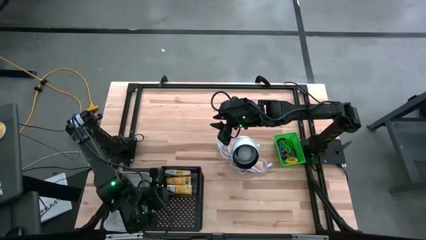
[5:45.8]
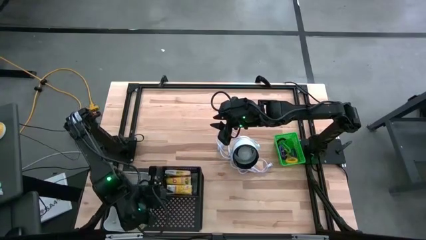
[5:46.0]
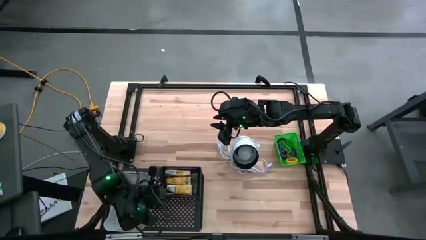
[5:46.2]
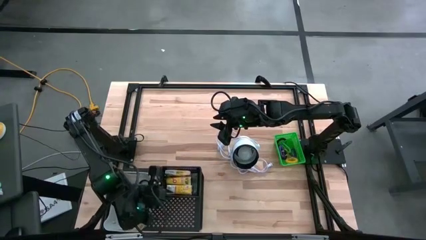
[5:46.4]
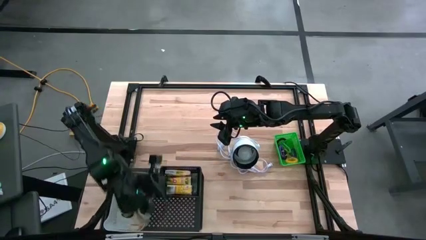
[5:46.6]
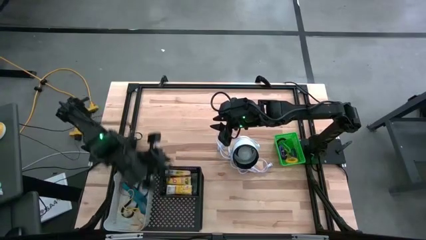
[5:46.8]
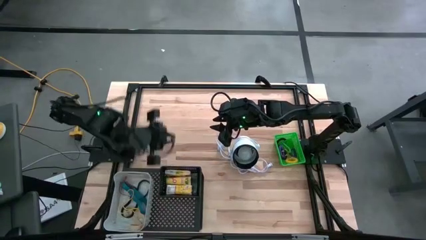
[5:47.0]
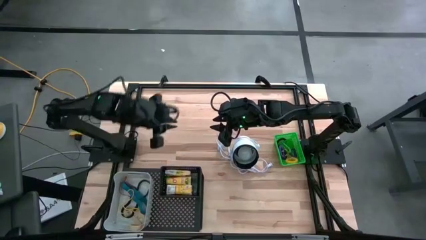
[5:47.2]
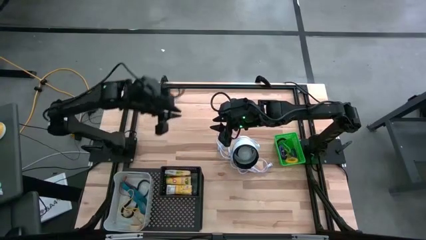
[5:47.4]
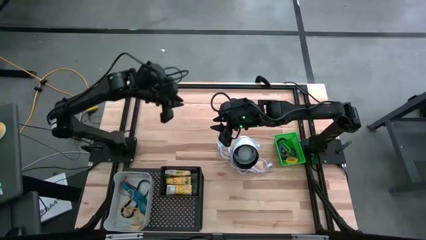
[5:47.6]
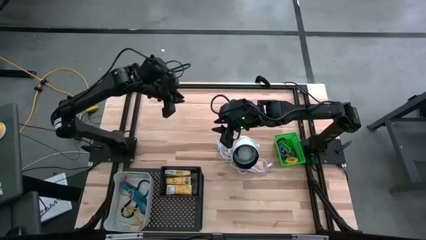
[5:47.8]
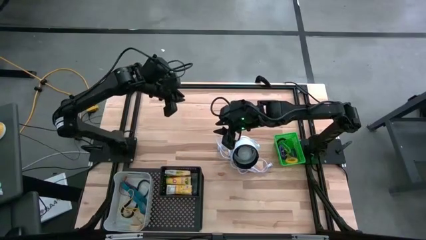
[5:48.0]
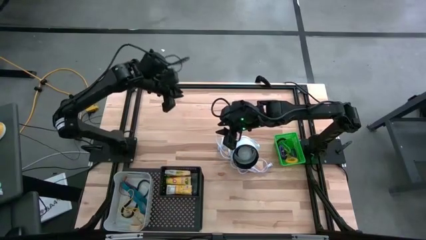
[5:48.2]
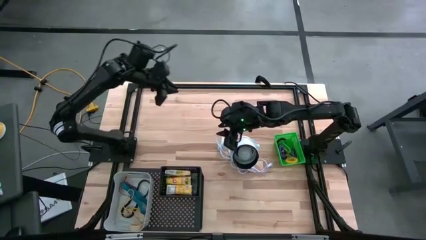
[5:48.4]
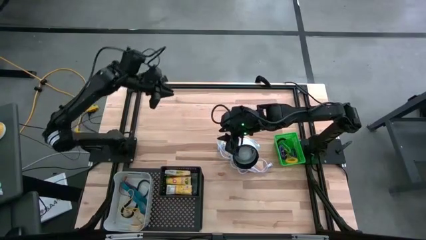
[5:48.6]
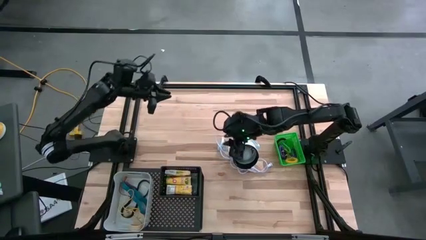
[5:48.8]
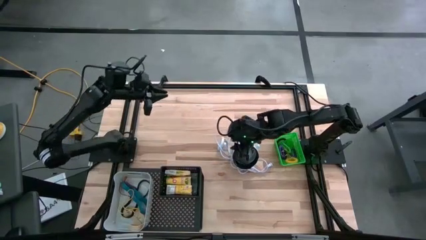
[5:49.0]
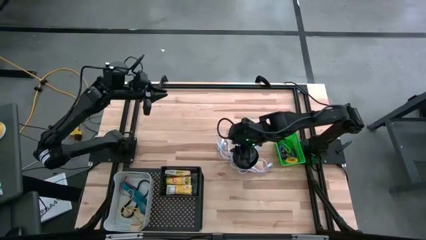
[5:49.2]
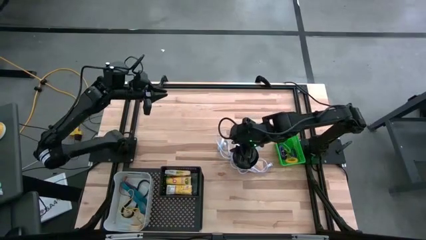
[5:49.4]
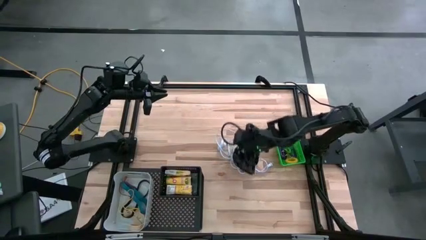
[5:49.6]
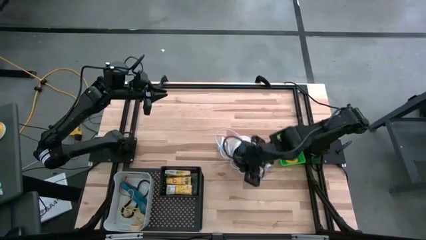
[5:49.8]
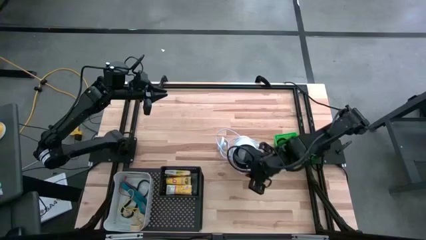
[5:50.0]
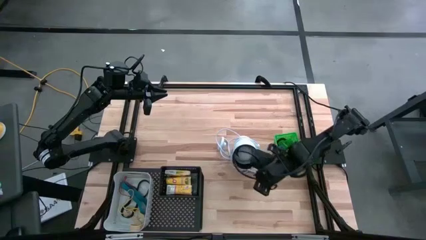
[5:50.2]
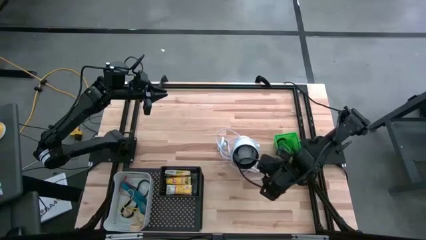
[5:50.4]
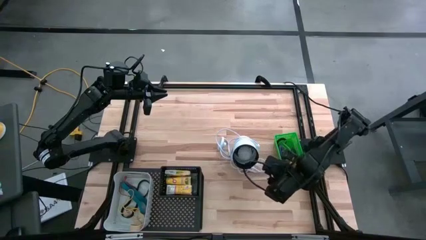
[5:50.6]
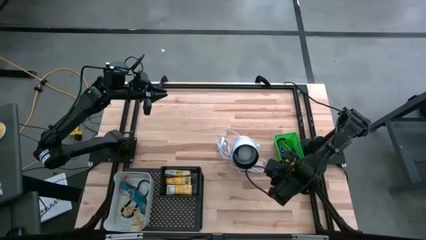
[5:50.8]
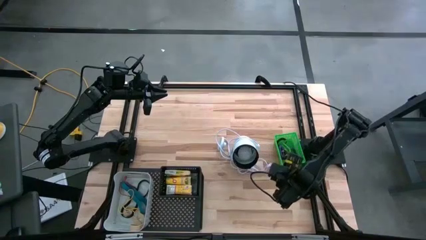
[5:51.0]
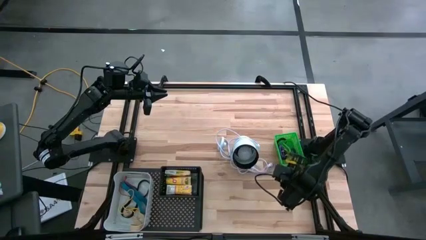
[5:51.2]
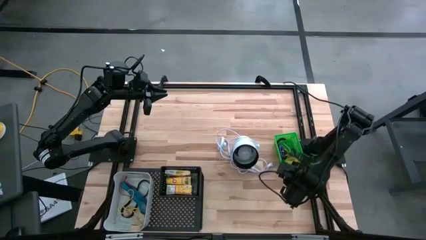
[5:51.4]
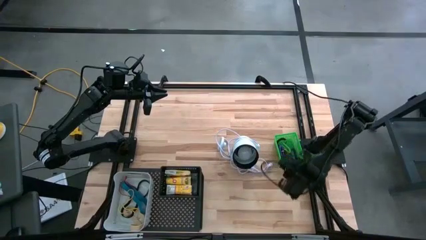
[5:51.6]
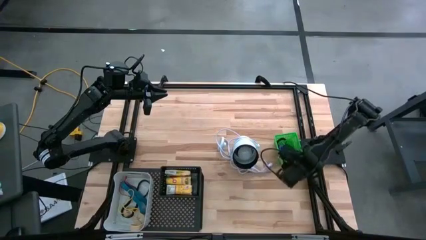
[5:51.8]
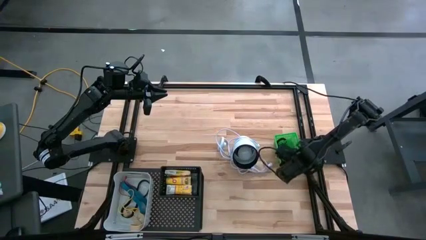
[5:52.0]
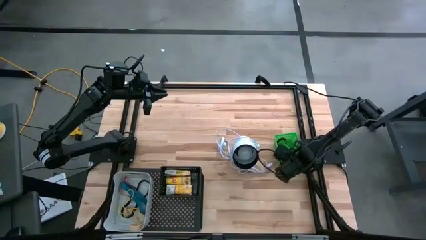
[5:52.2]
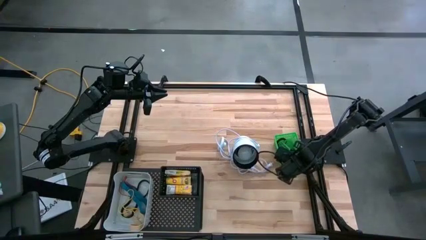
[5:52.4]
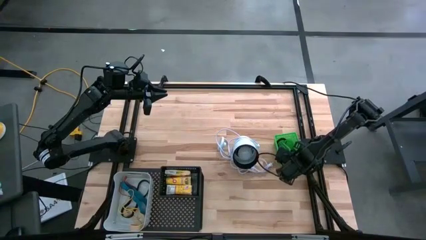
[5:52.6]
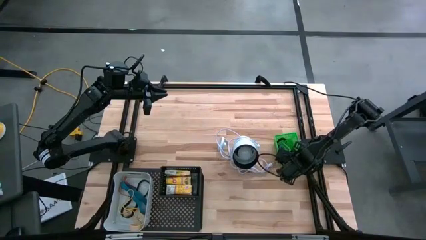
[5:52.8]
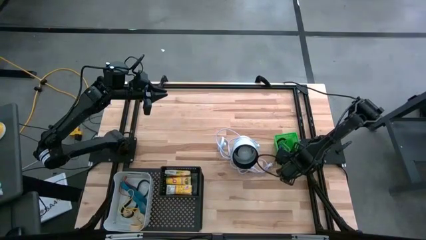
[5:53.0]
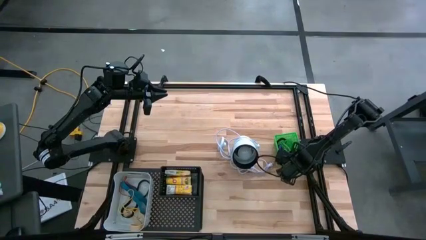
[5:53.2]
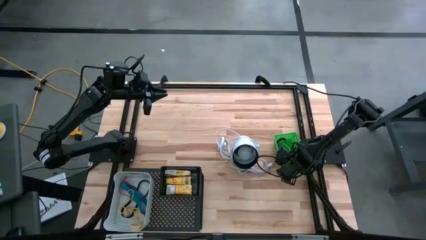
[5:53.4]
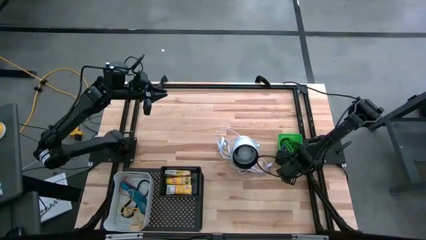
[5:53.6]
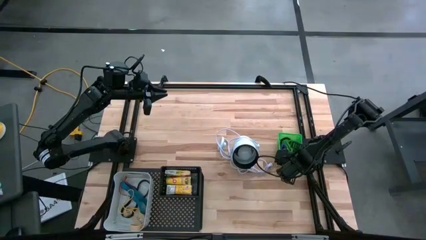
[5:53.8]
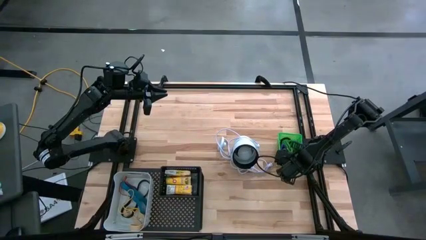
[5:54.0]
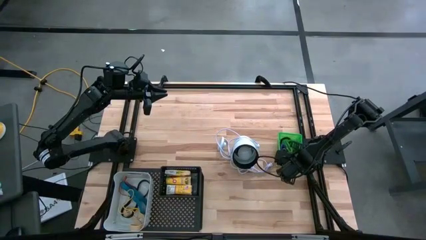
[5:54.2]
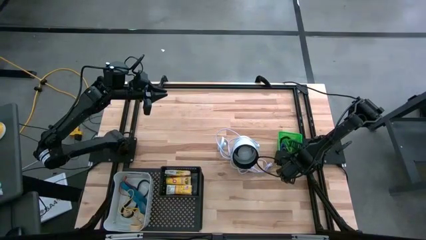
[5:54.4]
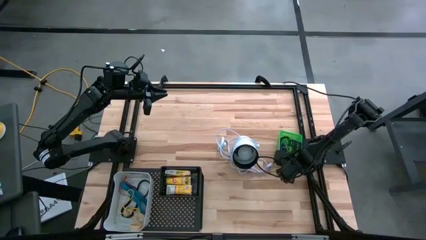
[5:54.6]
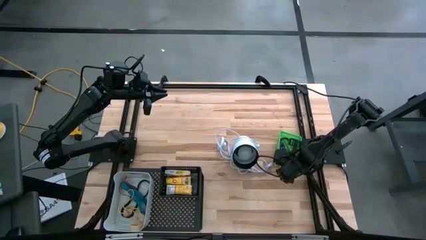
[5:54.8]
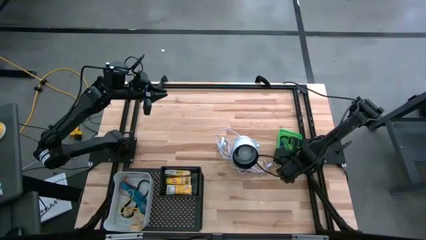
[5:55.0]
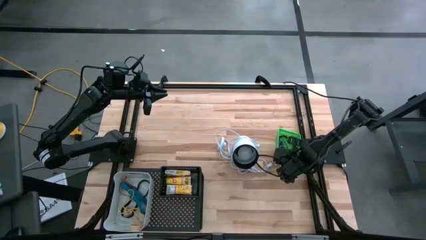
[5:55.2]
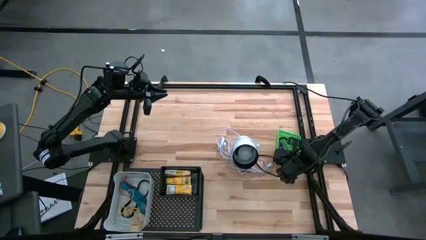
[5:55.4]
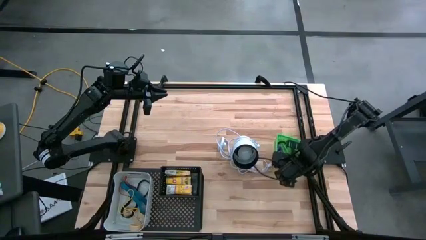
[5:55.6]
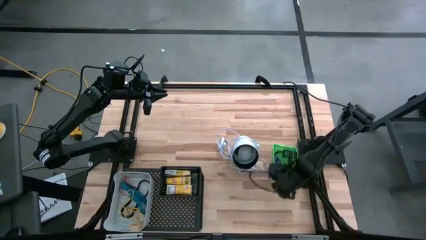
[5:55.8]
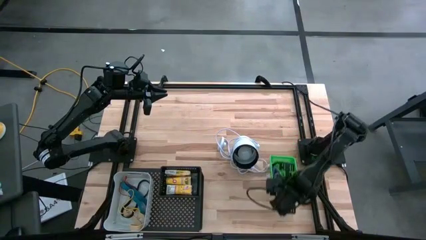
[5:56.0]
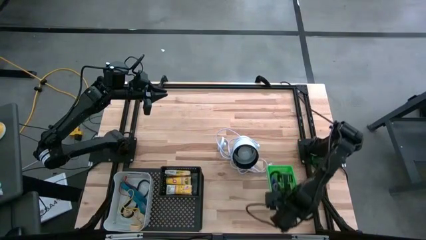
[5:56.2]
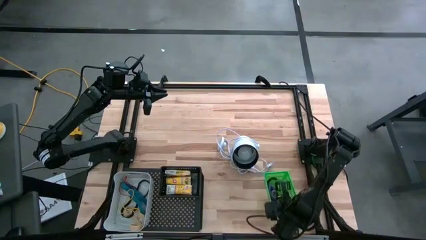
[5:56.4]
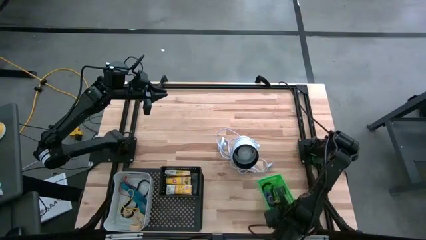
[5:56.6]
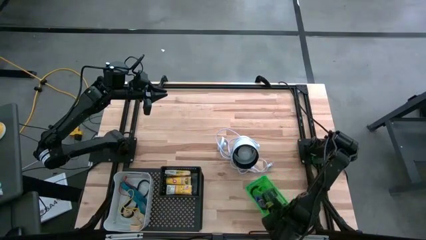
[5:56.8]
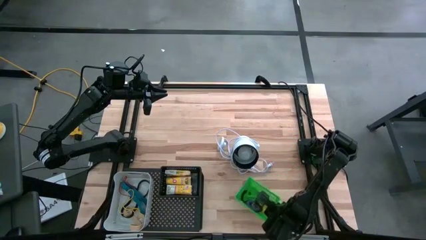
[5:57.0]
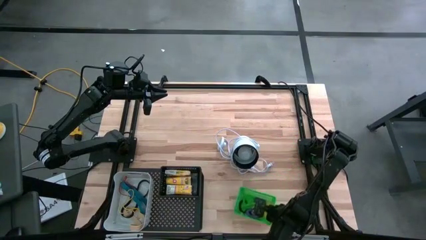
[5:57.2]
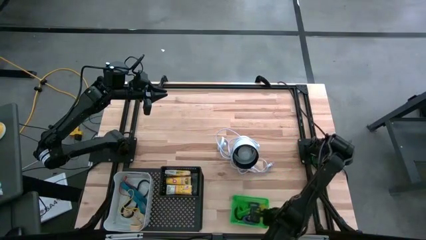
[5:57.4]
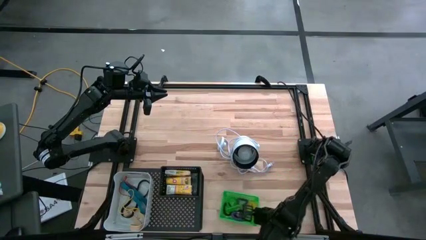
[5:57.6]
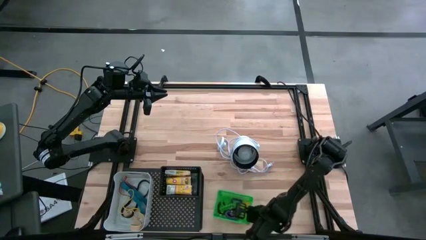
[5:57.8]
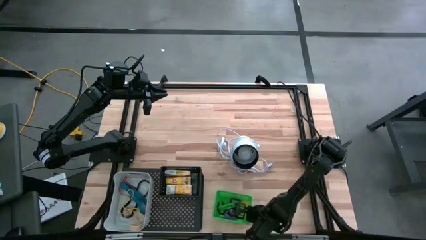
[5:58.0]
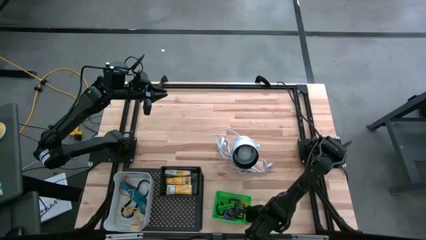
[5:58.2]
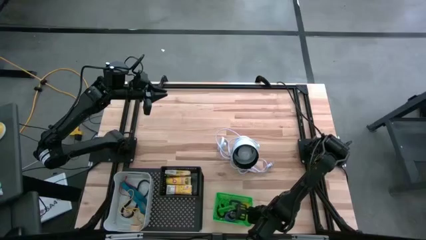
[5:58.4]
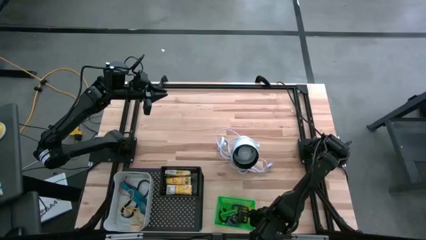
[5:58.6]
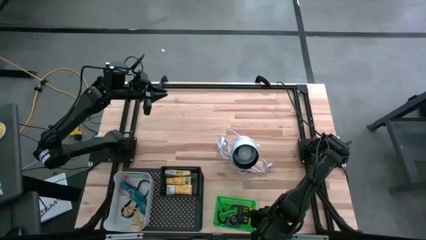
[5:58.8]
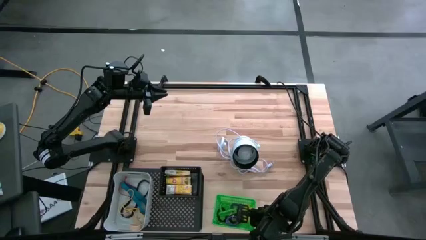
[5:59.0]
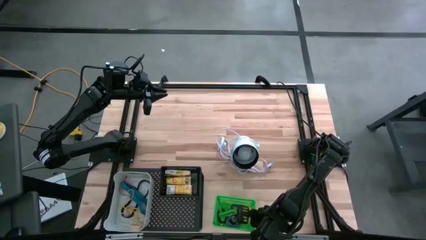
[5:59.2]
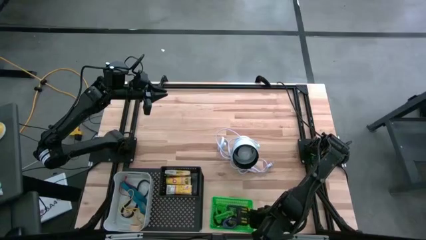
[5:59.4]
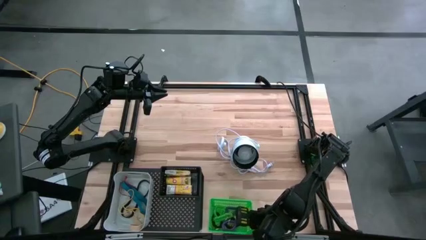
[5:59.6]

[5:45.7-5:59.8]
Task: Pick & Place Office Desk Supplies
Put the green bin on the shelf

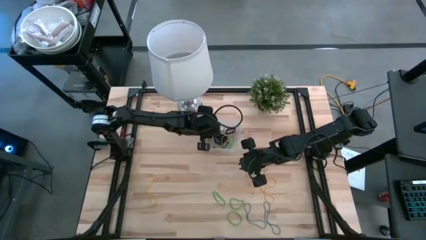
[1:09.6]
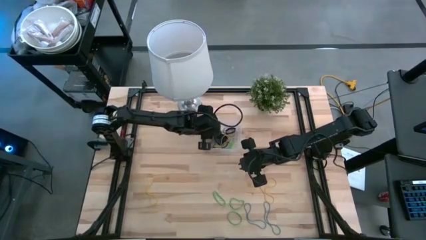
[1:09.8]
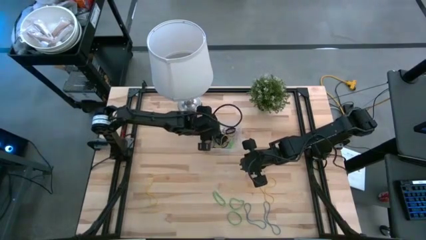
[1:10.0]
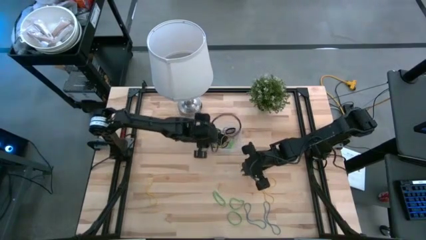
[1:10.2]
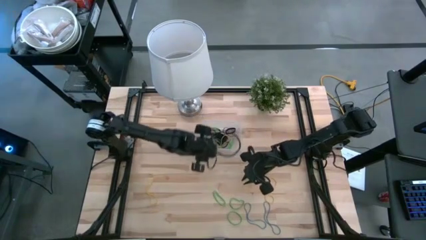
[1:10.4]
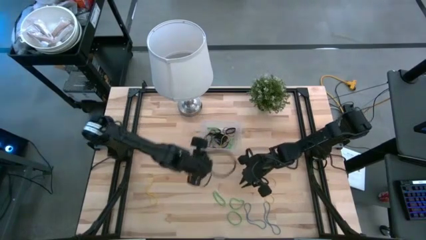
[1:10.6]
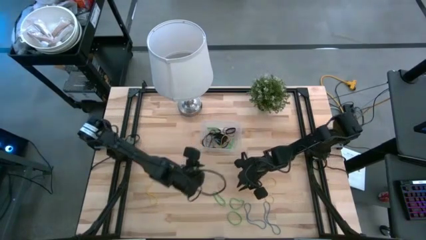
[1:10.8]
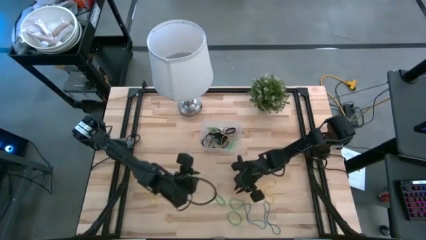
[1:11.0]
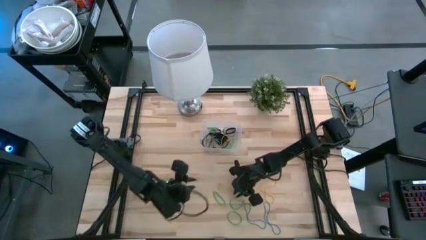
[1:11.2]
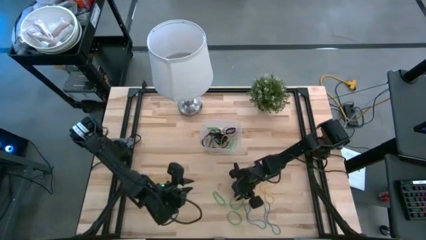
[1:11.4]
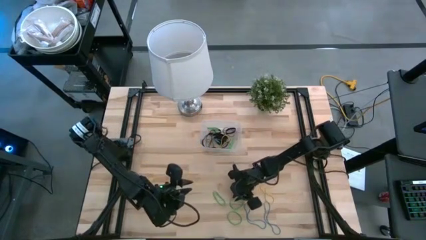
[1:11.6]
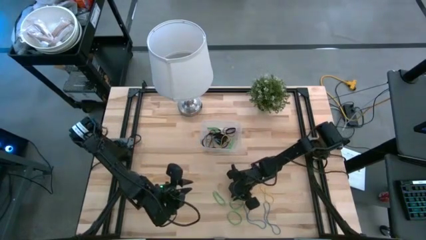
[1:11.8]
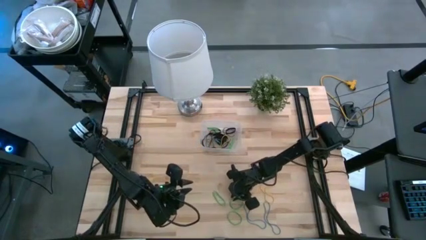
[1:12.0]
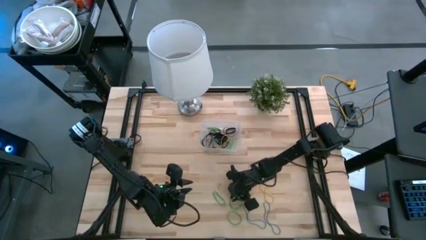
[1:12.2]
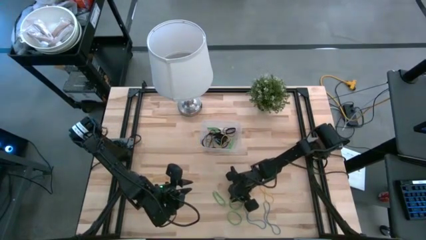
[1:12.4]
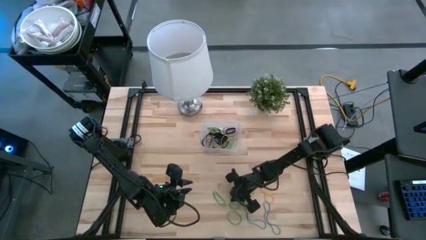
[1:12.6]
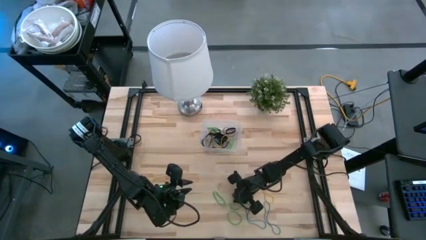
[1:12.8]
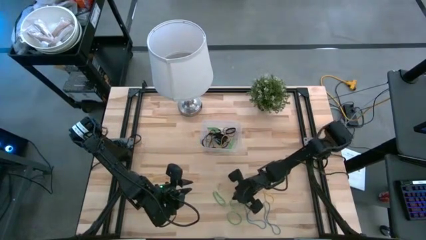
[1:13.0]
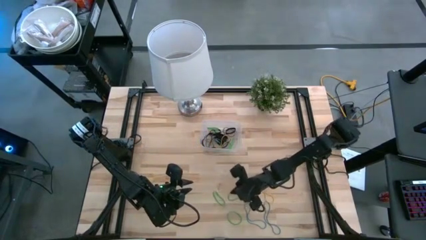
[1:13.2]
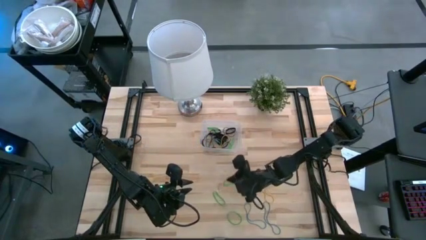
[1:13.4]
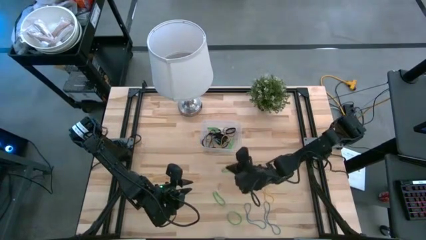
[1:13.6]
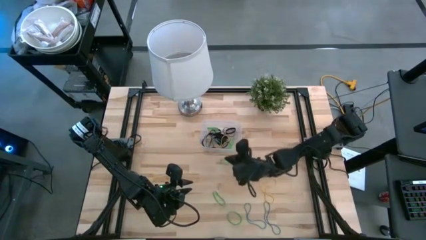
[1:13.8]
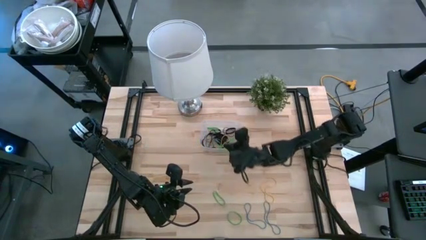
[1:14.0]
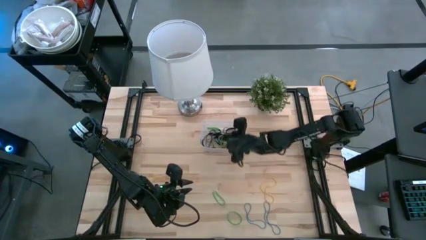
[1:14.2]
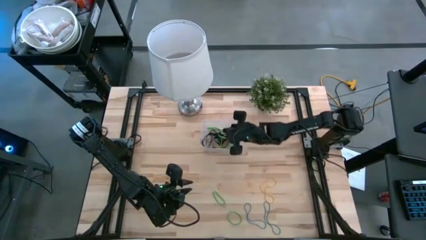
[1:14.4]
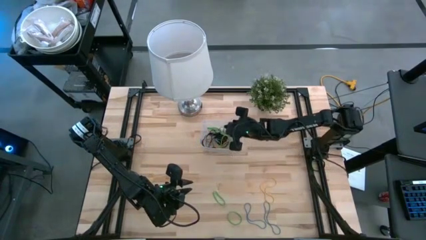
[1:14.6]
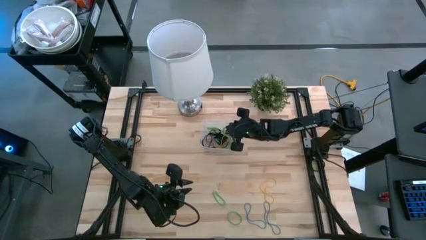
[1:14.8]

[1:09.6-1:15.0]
Task: Pick and place rubber bands into bin
Put the green rubber band into the transparent bin
